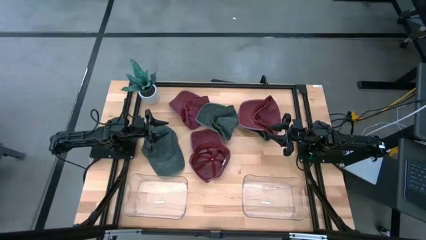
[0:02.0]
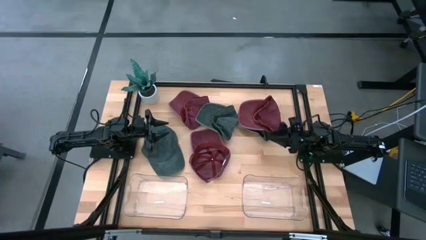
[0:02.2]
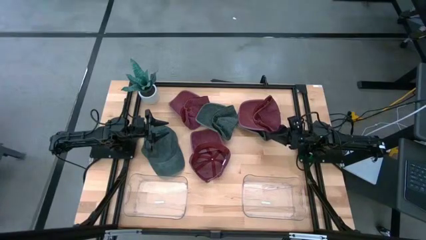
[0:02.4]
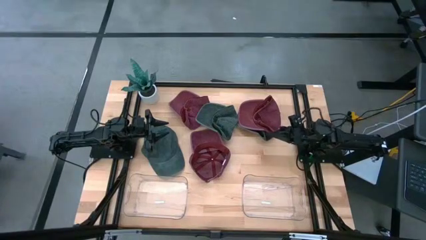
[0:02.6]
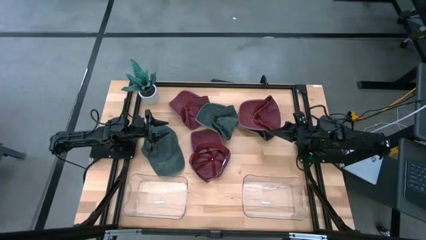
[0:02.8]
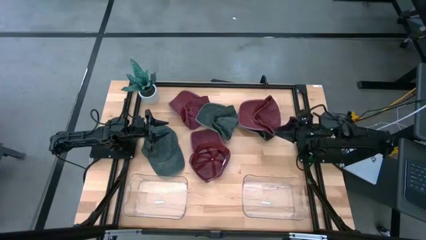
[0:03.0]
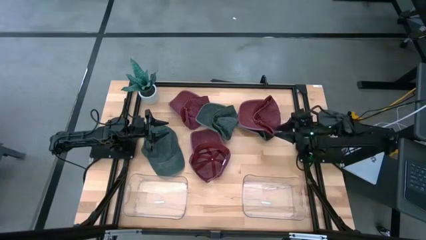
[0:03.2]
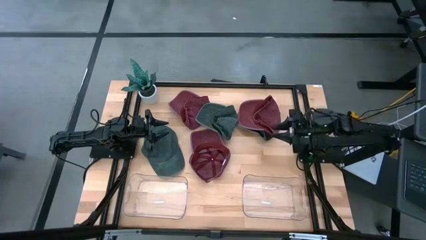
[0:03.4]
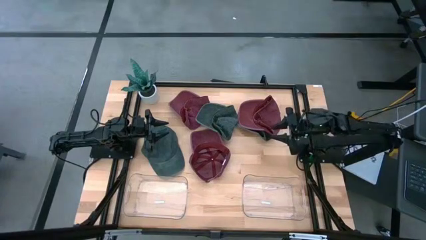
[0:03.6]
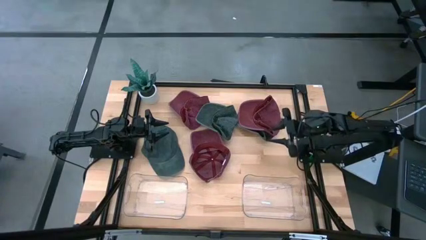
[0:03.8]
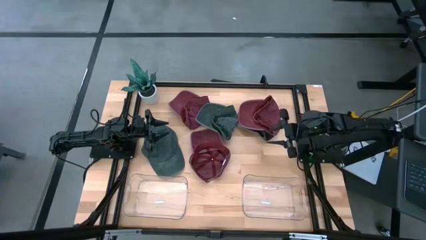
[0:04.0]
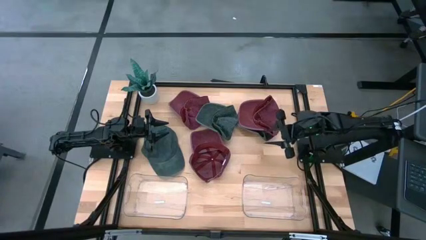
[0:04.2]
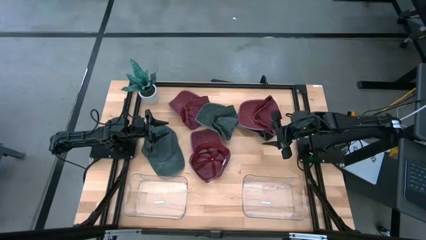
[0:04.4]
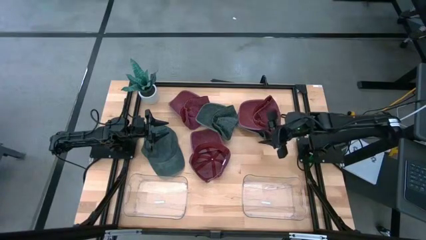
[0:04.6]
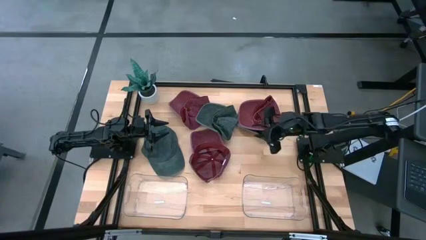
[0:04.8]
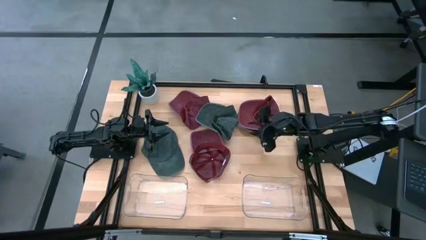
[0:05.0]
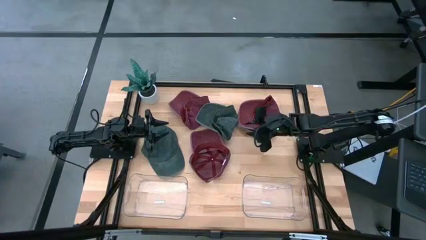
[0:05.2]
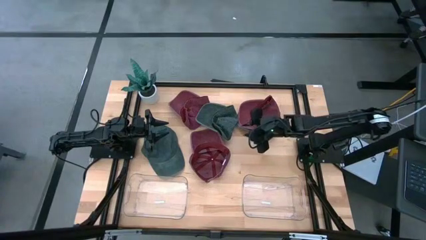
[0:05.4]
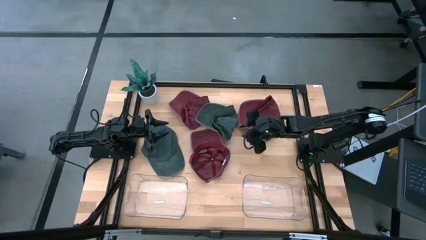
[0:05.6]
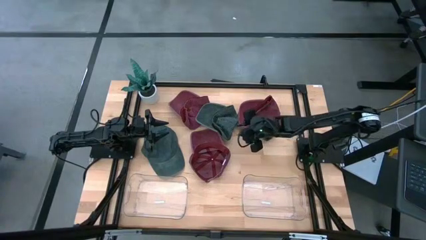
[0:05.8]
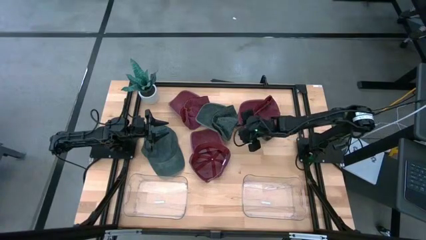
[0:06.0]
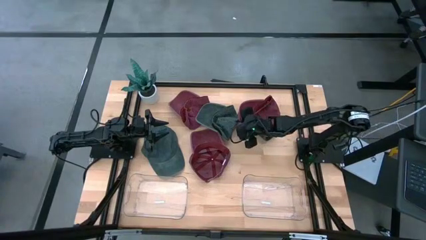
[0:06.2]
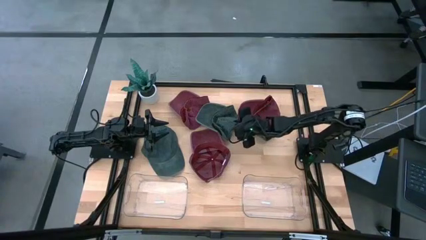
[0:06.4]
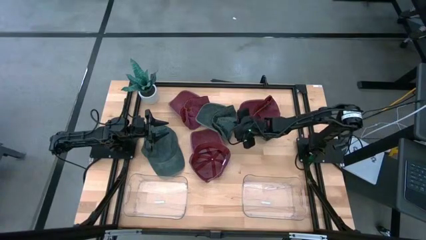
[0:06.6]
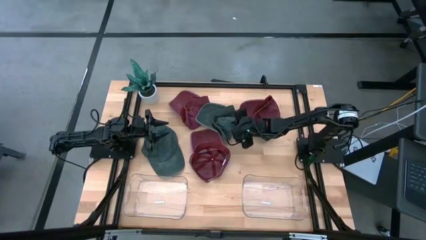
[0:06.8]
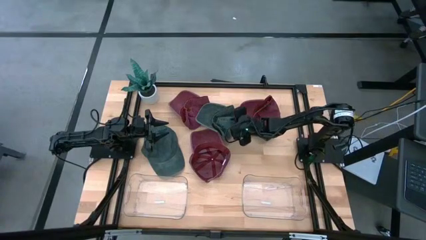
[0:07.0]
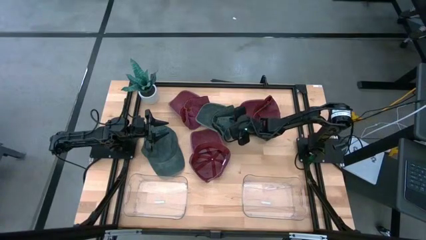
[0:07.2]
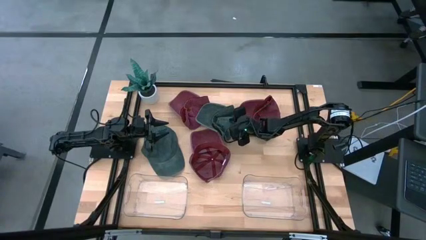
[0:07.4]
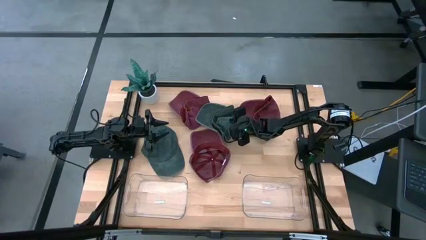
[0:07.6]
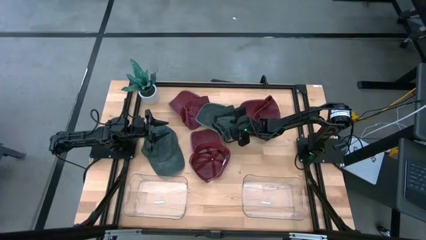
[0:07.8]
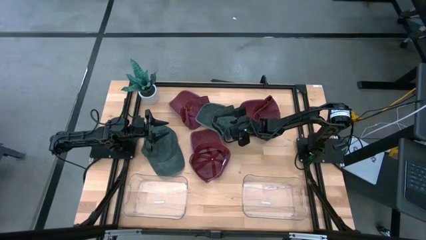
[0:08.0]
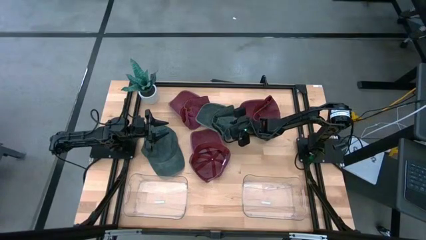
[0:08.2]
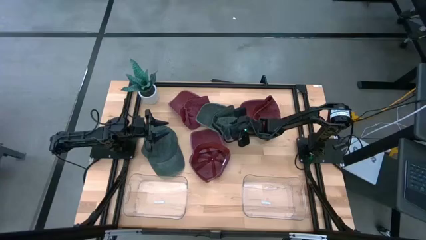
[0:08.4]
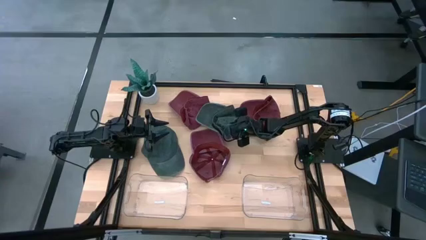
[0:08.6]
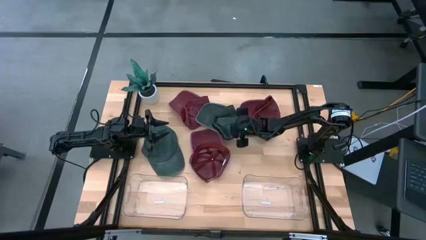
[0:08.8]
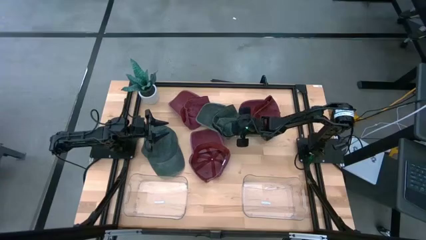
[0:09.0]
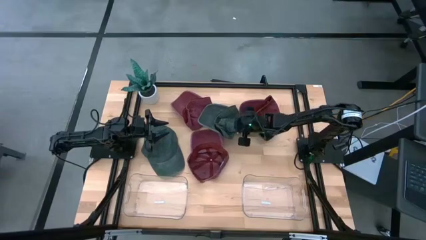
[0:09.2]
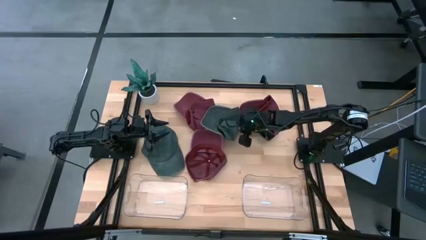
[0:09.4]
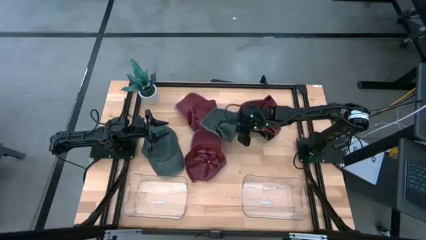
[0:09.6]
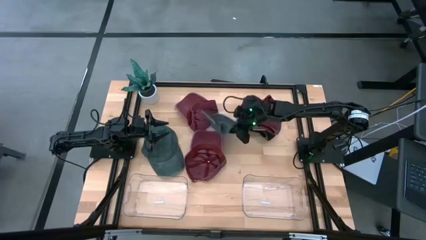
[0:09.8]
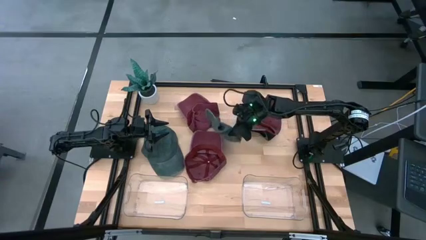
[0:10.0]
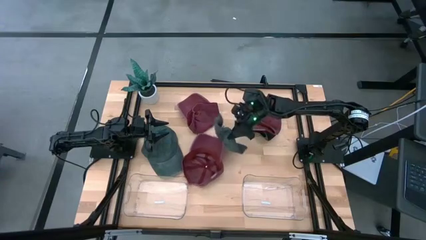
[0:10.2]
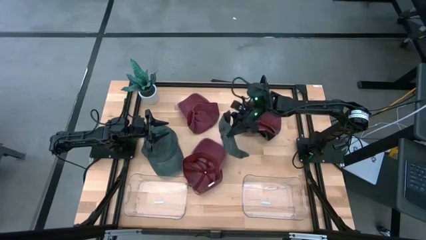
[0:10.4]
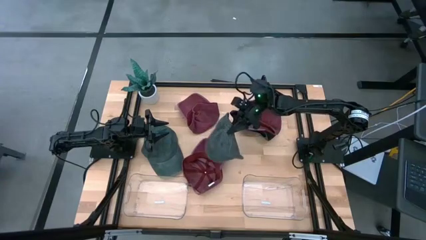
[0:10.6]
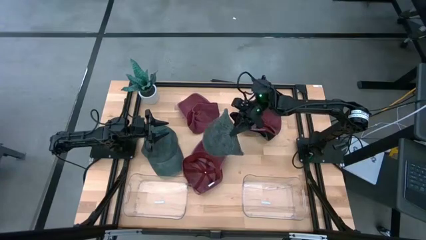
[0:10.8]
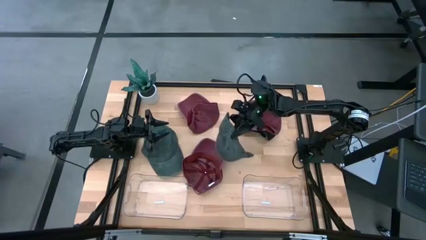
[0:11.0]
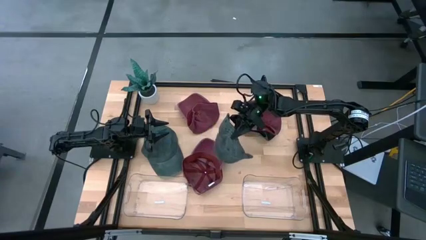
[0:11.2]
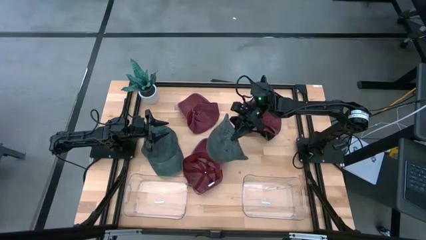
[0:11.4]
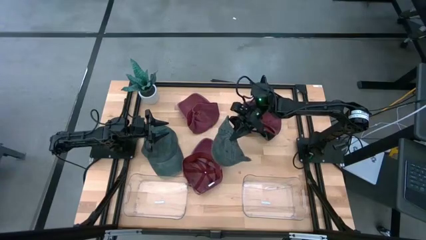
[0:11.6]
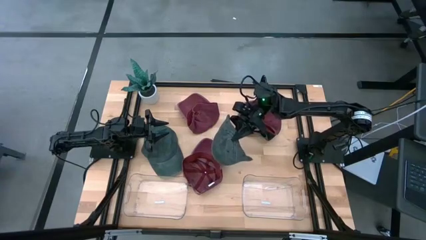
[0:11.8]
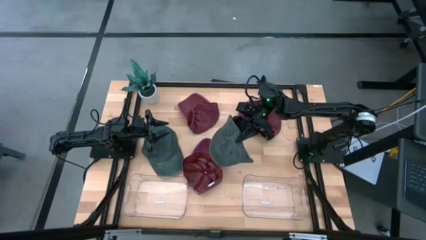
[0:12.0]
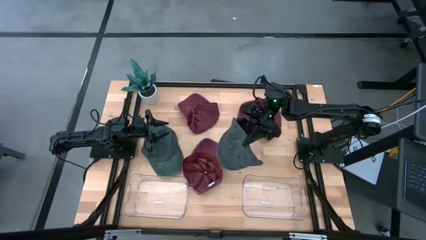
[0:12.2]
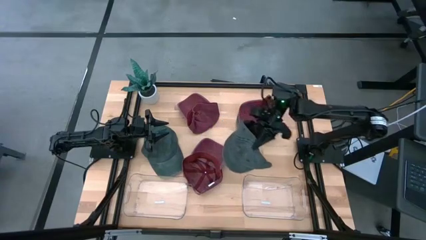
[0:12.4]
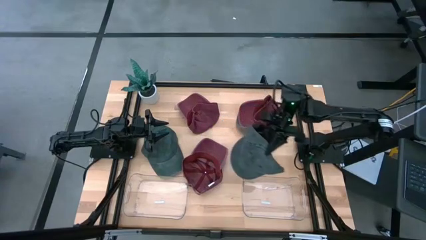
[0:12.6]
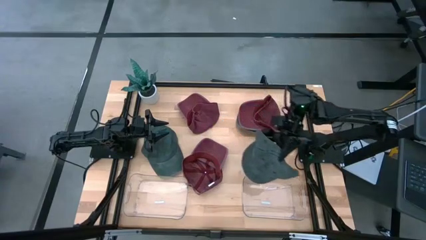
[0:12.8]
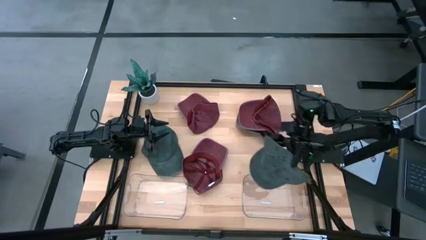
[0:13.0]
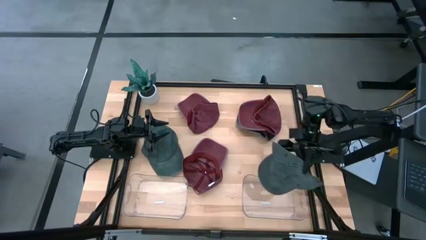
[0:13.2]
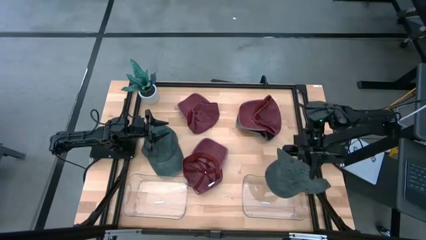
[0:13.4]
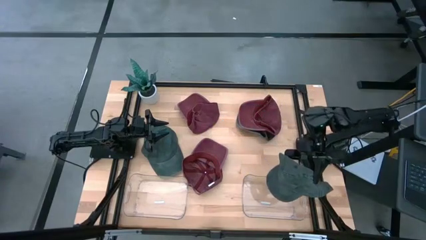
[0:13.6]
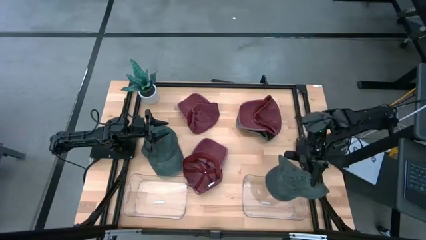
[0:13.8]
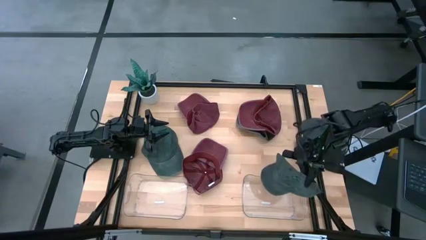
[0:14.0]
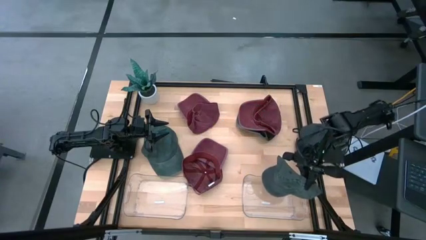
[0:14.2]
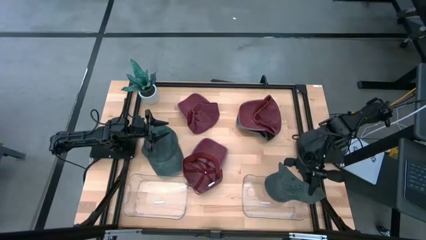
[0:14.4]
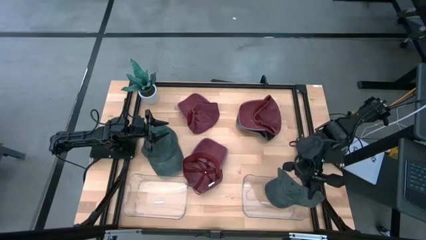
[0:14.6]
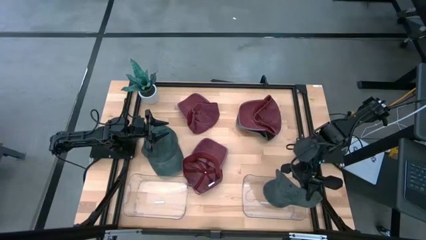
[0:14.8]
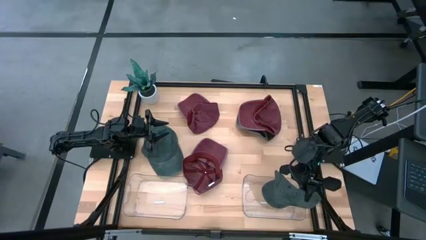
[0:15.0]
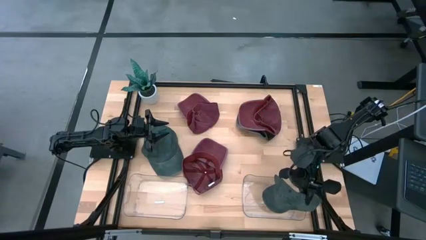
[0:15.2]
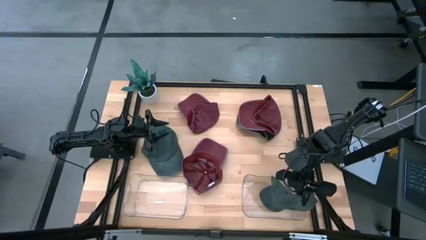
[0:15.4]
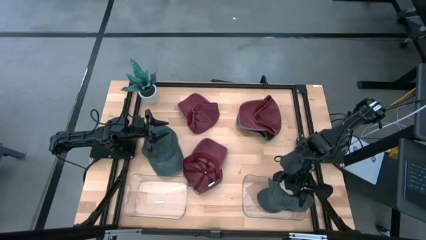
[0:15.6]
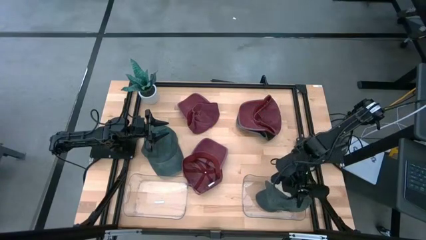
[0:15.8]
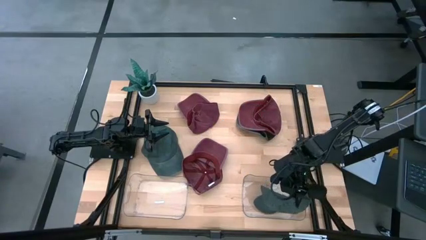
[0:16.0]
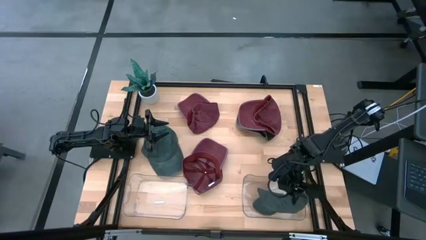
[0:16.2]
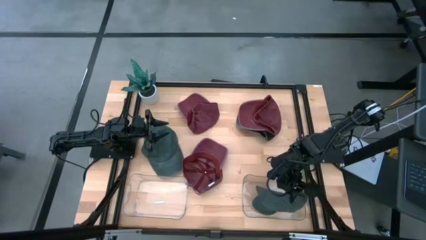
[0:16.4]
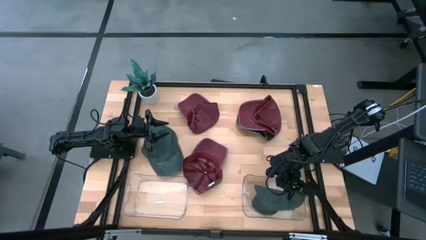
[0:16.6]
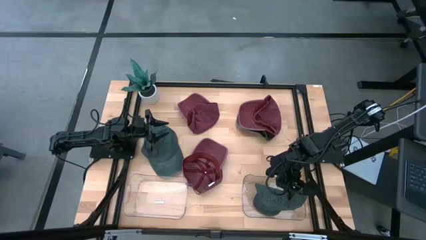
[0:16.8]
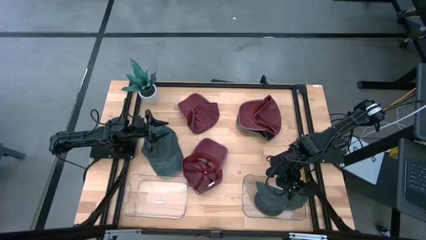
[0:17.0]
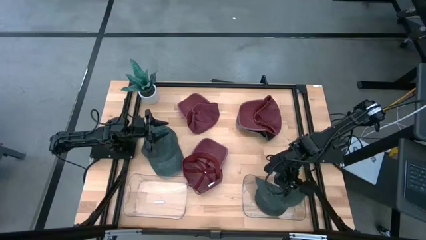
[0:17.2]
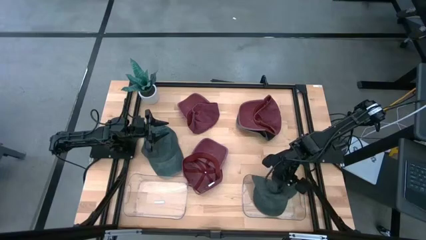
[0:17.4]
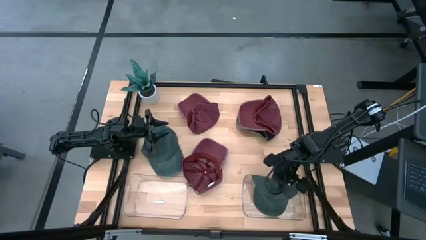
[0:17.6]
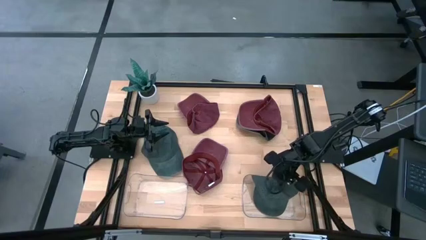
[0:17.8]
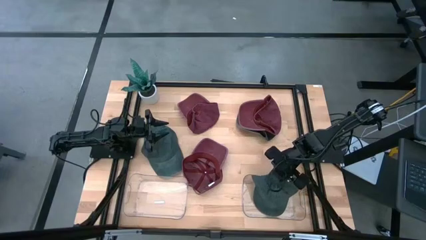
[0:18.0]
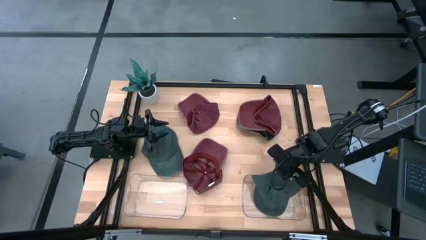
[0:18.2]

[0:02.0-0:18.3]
Task: Pick & Place hat
Put the top left gray cap into the right transparent bin
